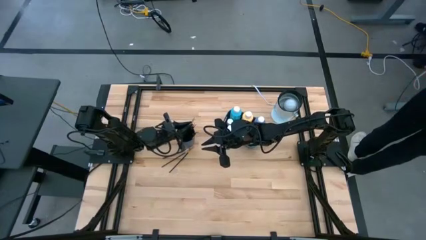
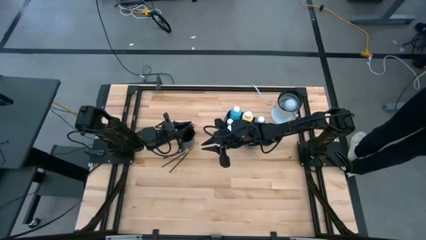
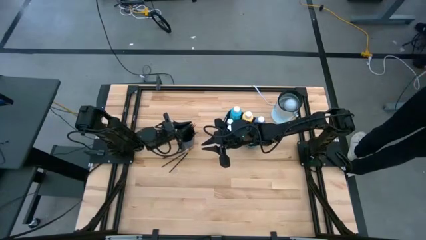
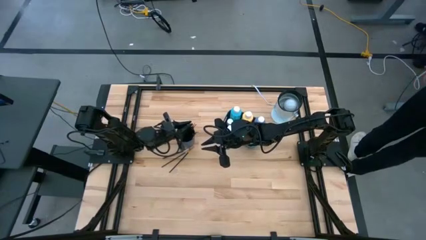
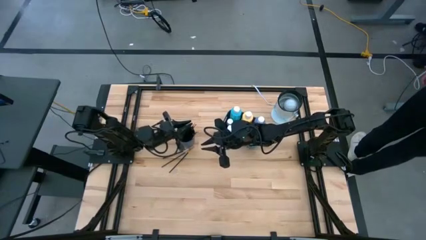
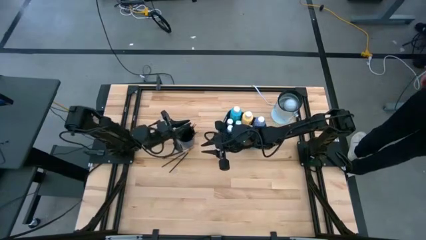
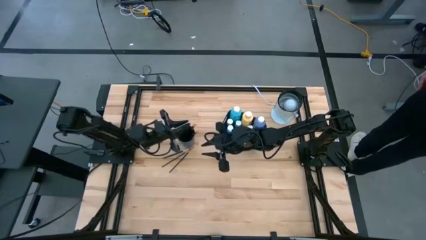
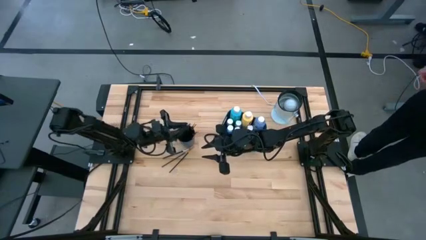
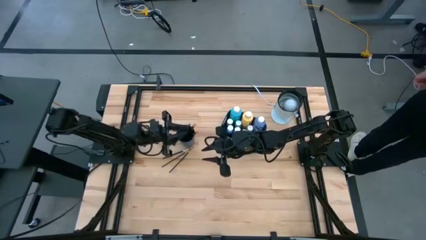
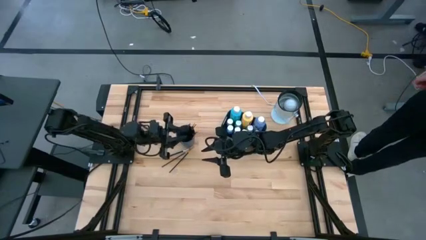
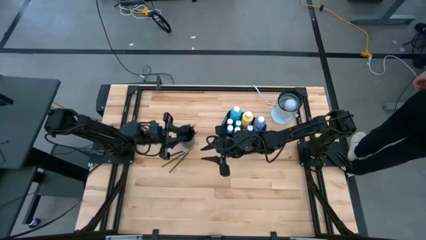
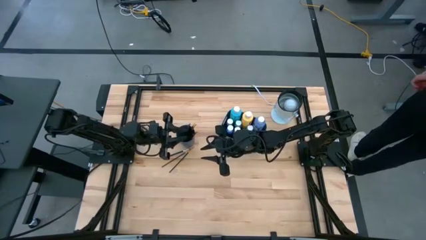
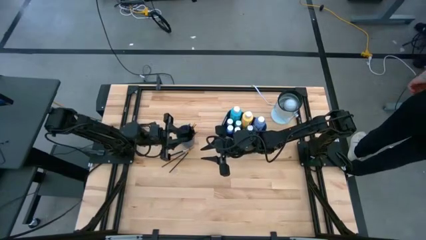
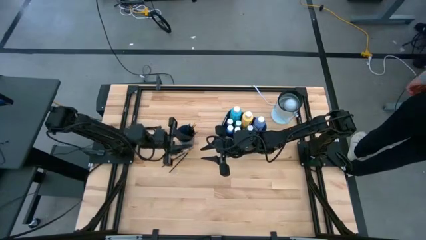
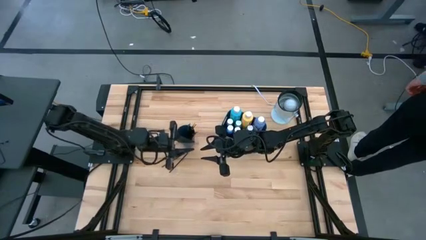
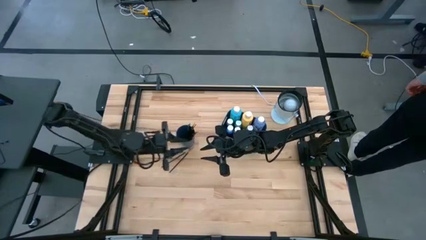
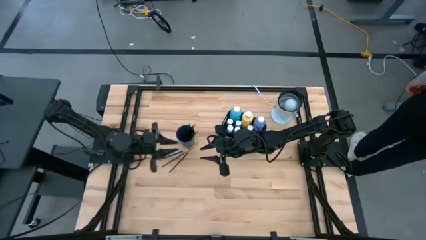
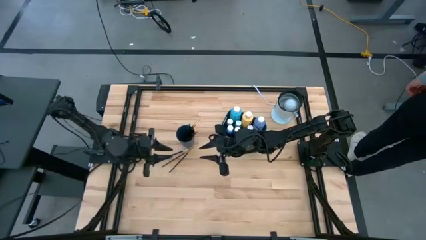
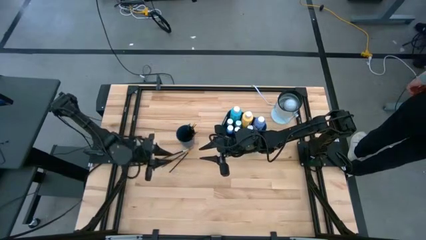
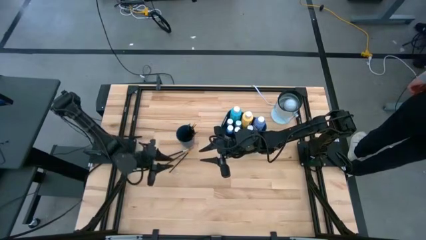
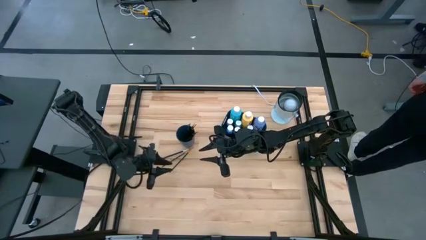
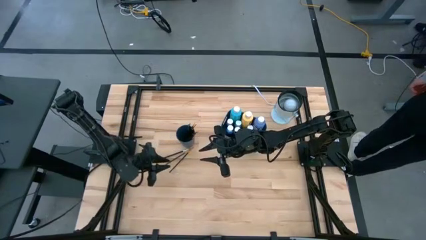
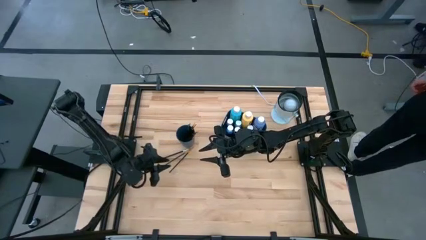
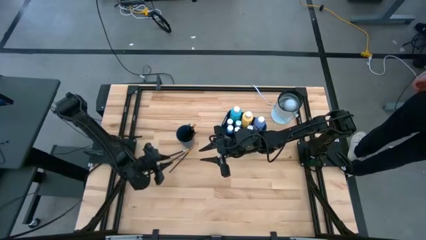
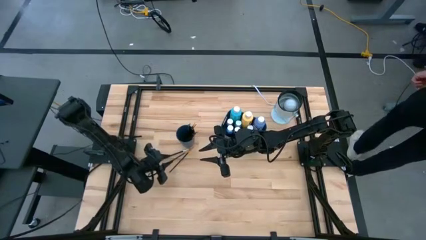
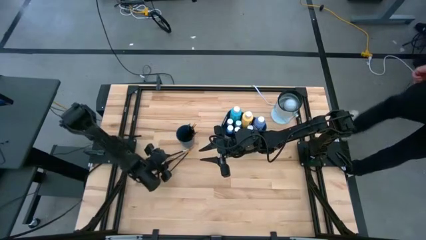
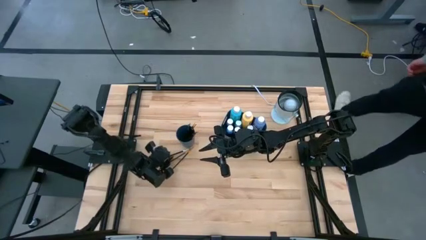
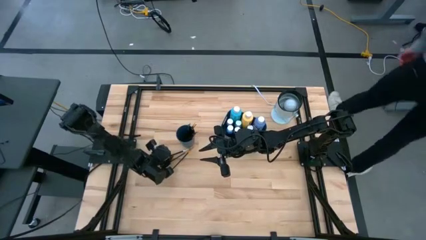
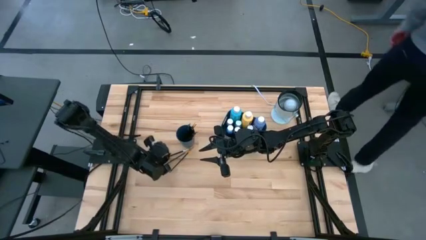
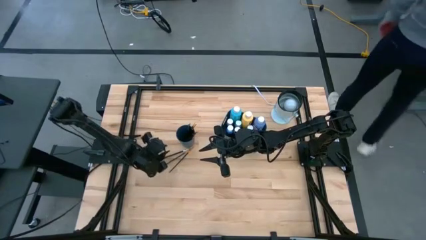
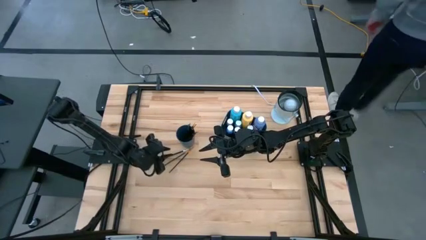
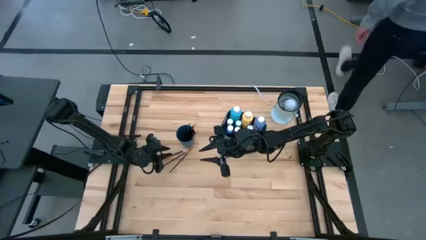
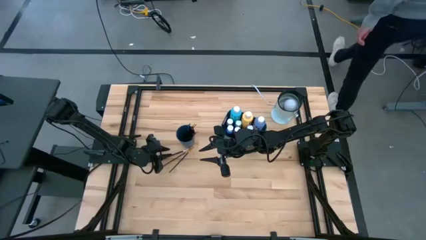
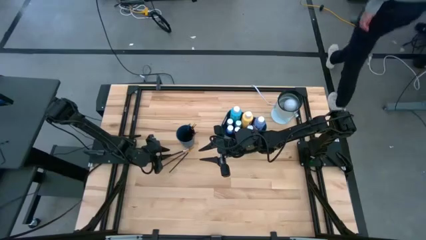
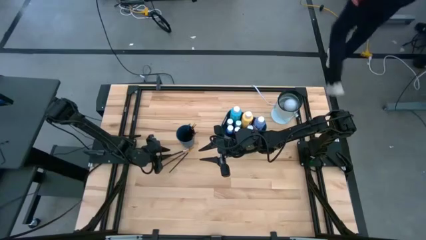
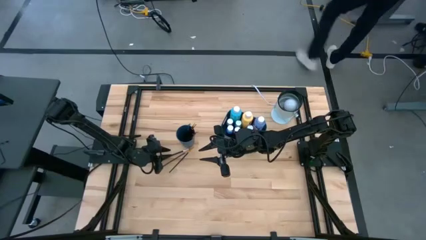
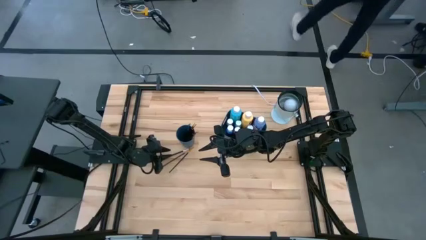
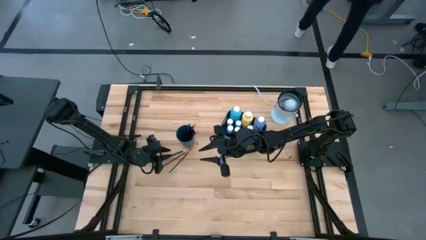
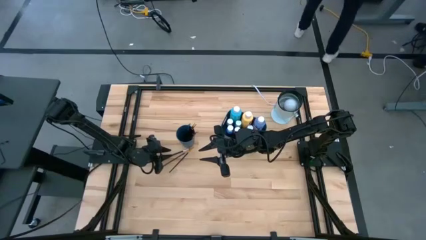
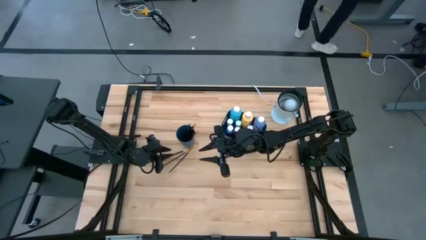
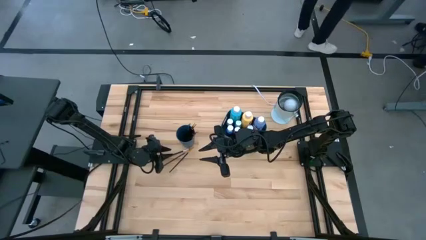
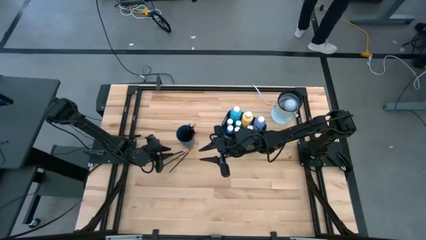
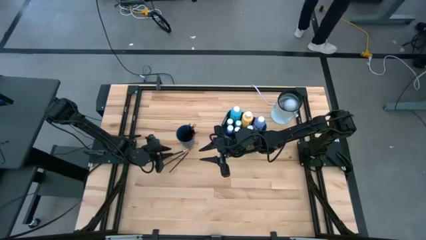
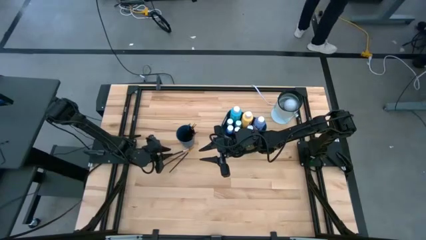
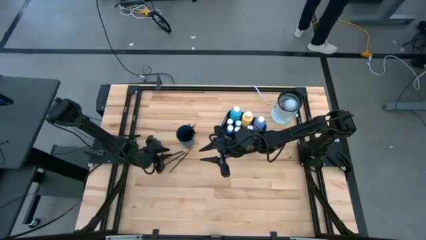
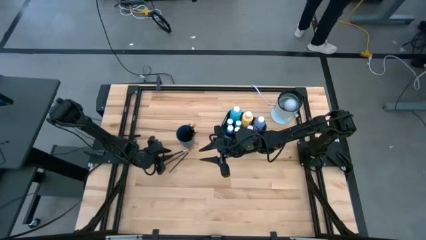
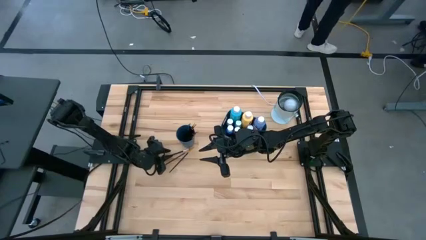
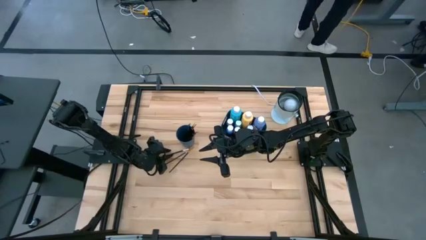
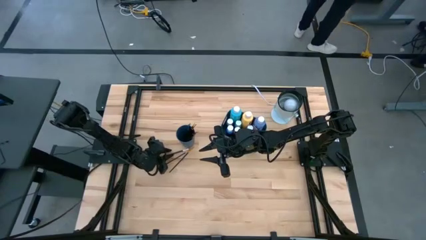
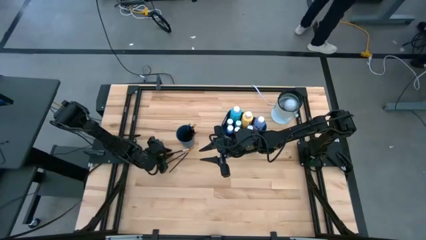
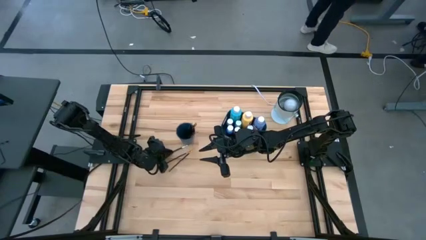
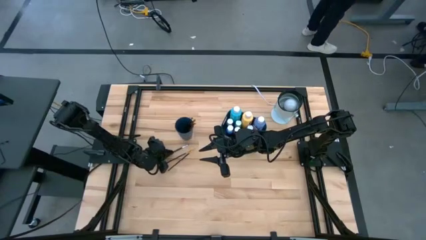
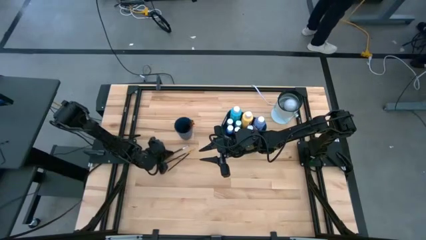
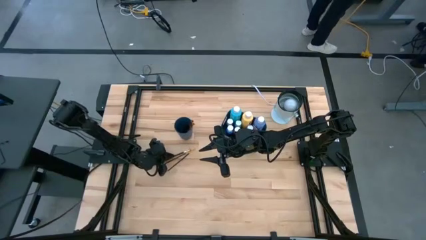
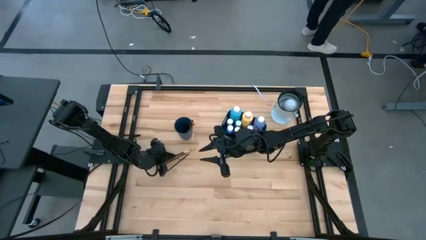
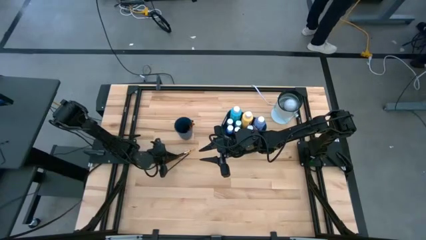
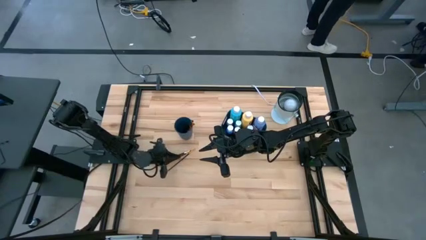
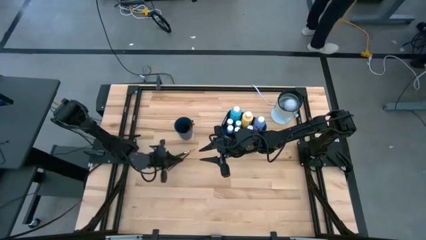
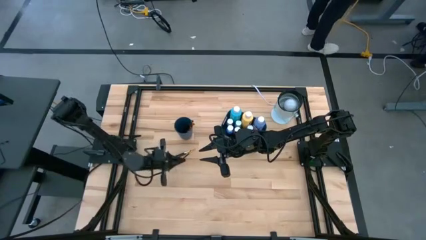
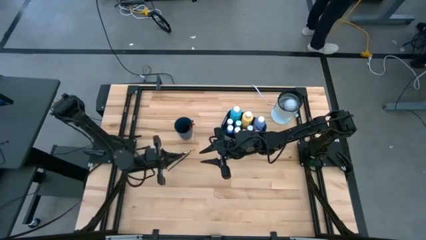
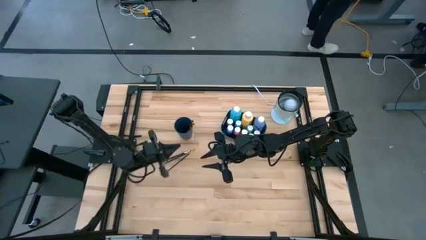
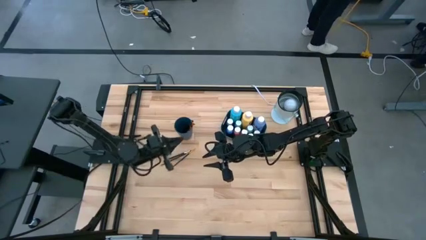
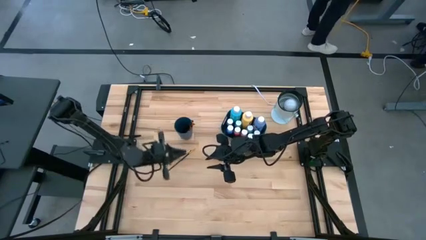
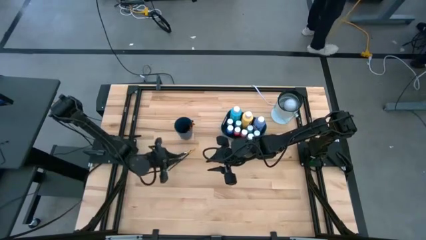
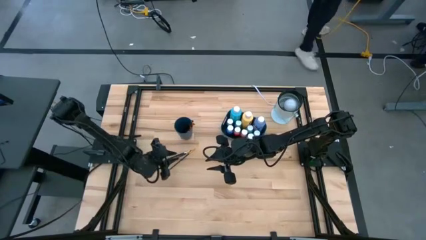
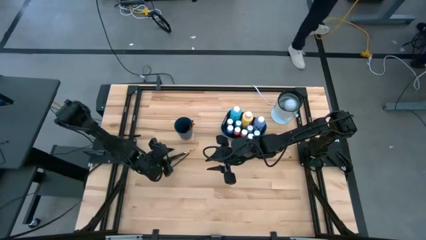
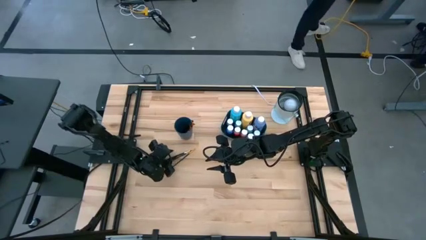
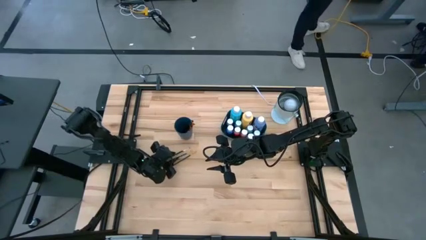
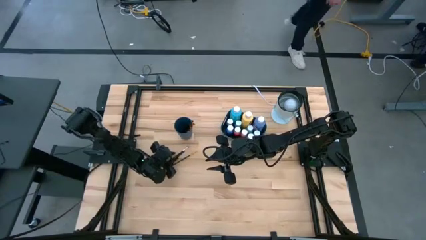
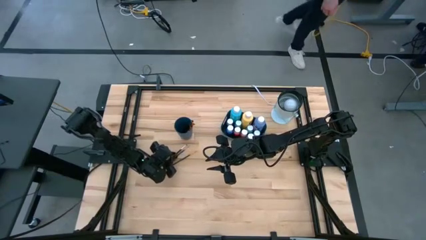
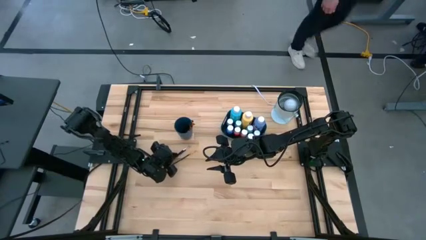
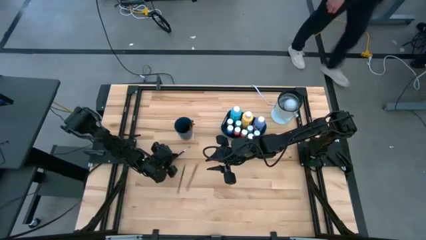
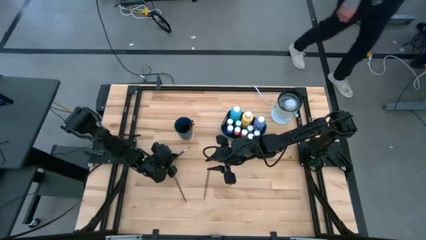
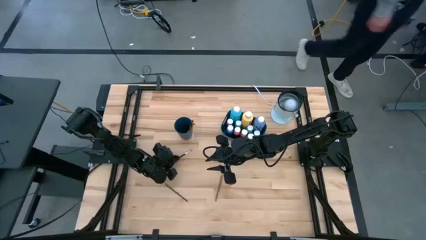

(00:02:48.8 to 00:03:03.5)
Task: Pick & Place Paint Supplies
Put the silver paintbrush into the blue cup
